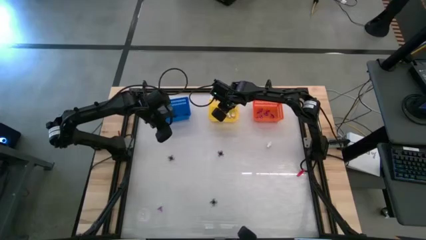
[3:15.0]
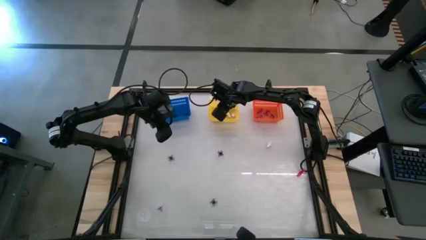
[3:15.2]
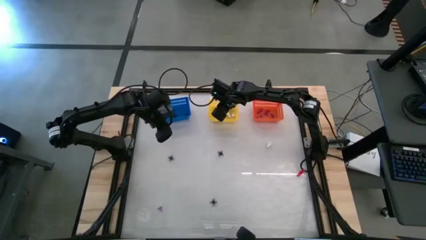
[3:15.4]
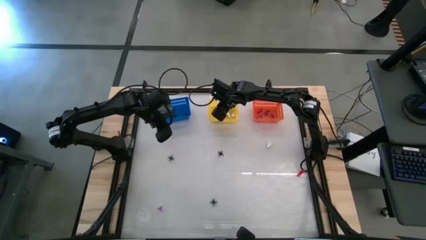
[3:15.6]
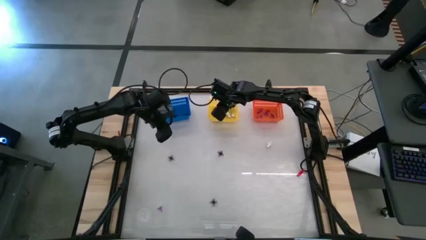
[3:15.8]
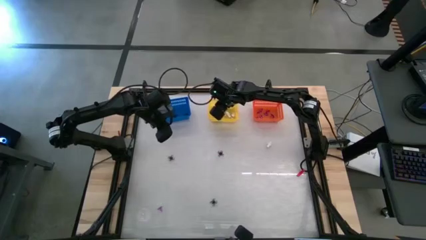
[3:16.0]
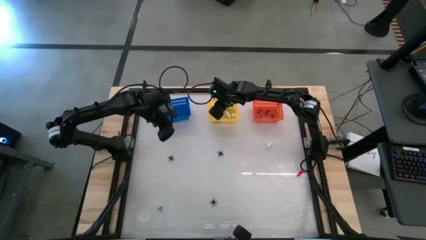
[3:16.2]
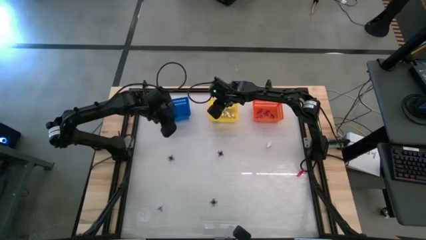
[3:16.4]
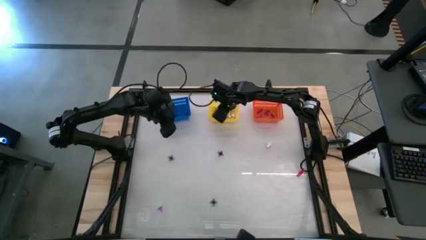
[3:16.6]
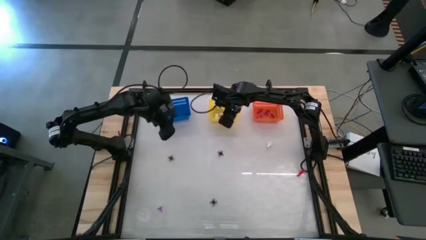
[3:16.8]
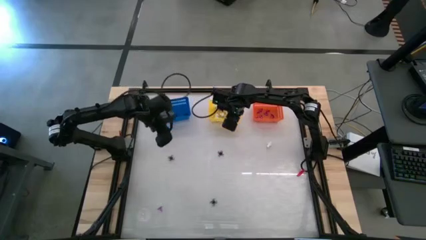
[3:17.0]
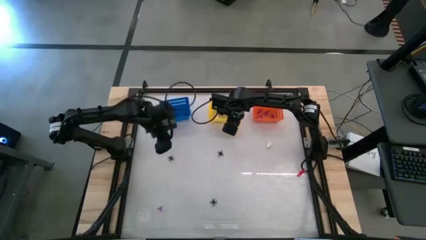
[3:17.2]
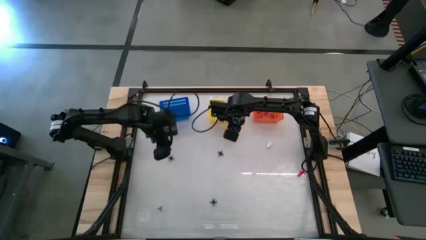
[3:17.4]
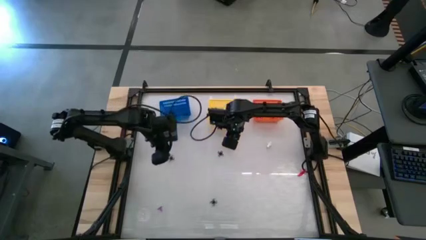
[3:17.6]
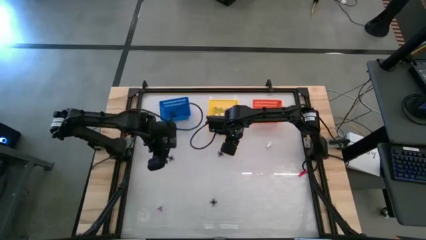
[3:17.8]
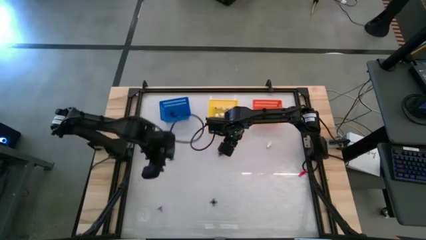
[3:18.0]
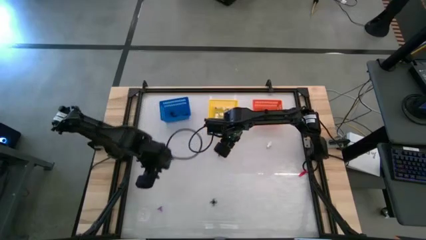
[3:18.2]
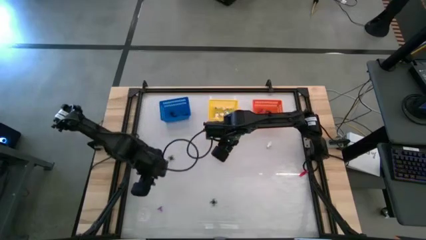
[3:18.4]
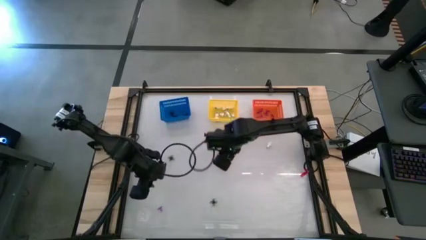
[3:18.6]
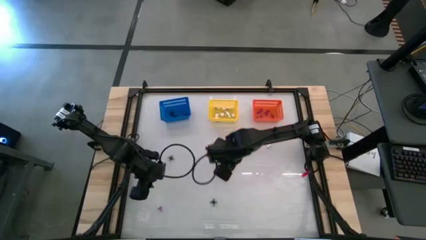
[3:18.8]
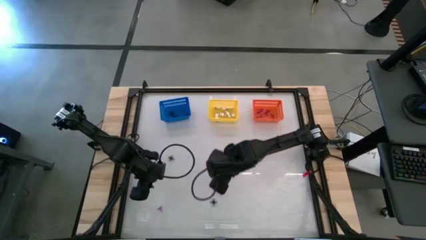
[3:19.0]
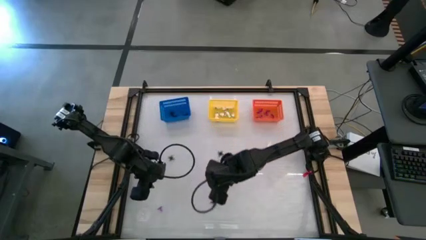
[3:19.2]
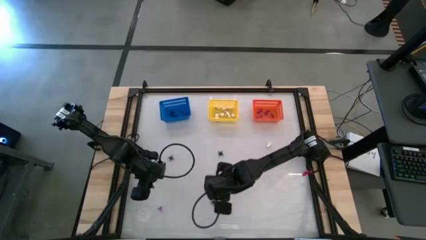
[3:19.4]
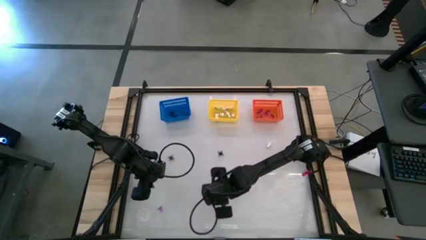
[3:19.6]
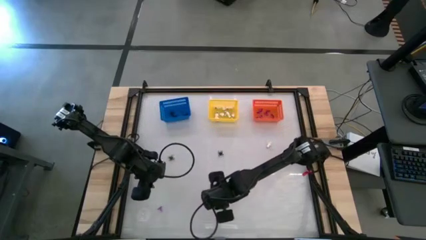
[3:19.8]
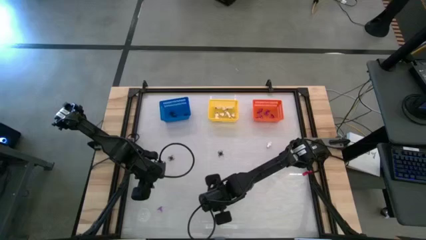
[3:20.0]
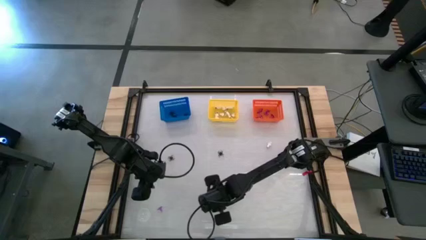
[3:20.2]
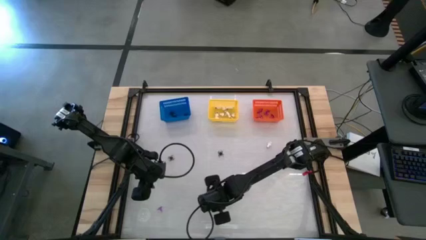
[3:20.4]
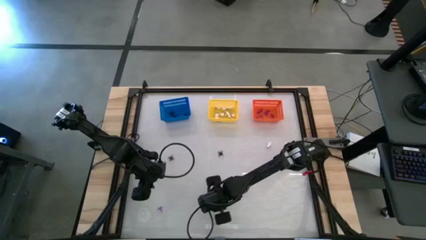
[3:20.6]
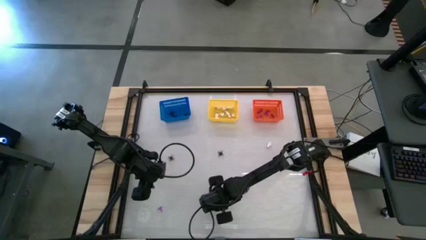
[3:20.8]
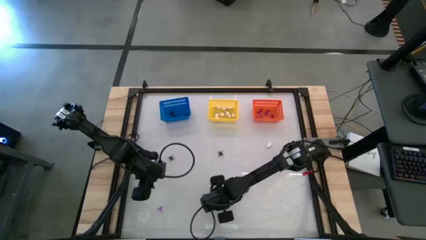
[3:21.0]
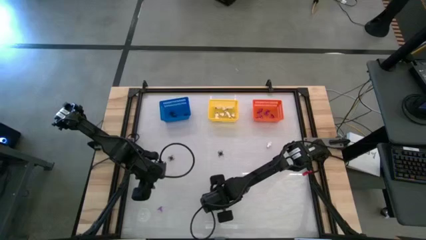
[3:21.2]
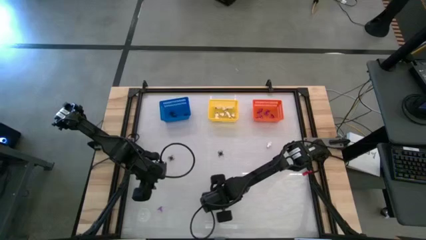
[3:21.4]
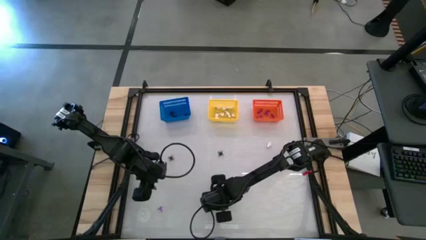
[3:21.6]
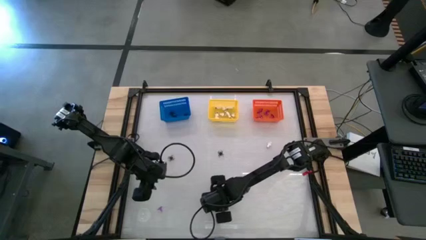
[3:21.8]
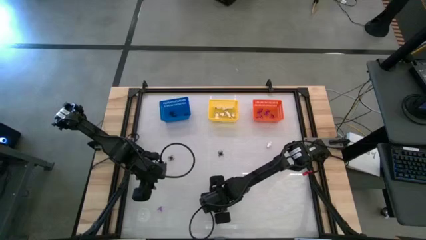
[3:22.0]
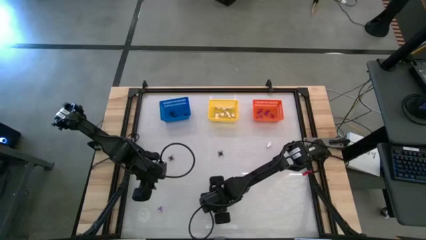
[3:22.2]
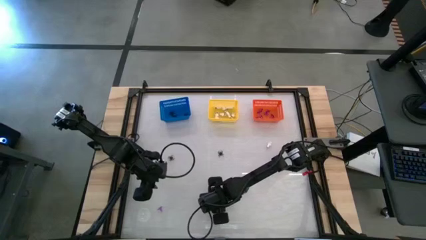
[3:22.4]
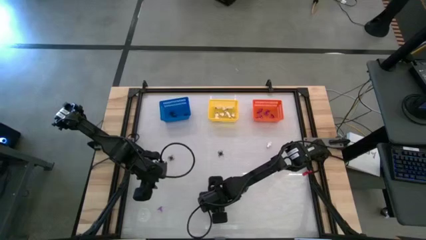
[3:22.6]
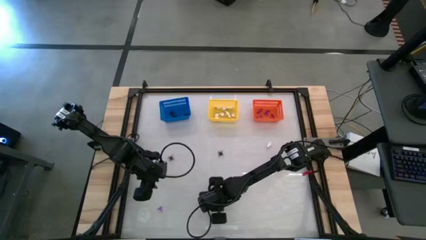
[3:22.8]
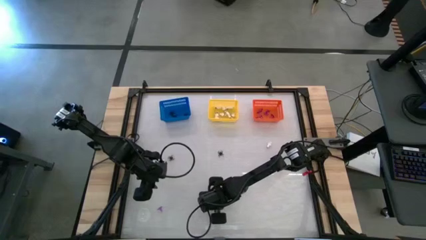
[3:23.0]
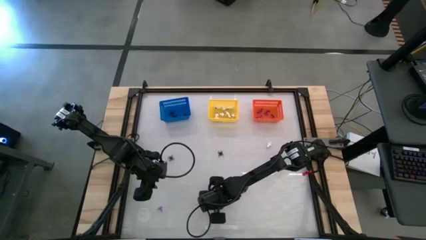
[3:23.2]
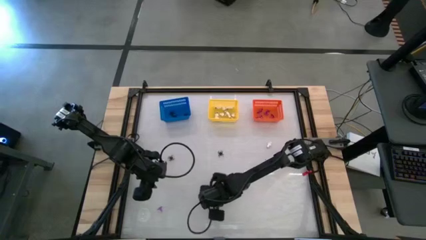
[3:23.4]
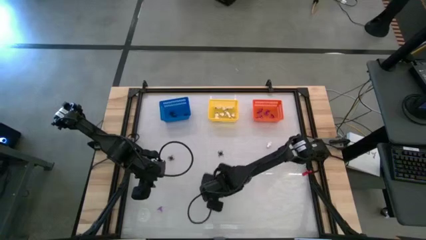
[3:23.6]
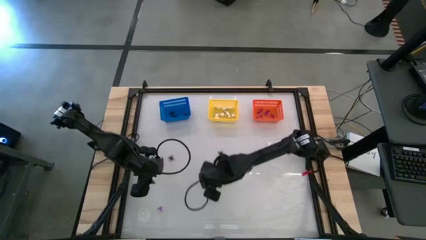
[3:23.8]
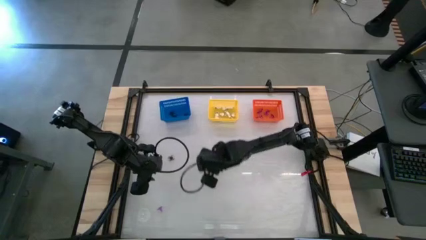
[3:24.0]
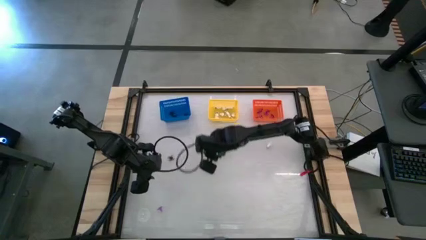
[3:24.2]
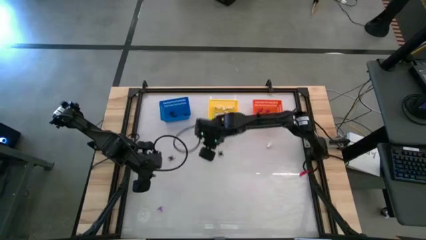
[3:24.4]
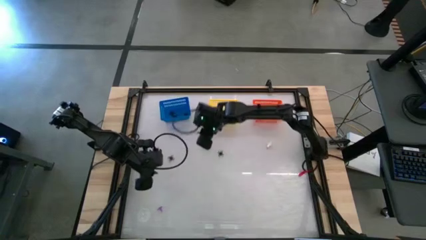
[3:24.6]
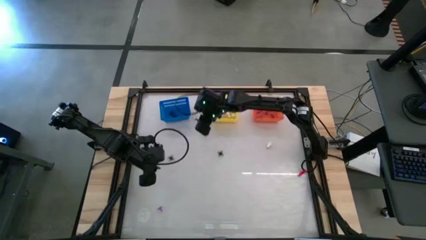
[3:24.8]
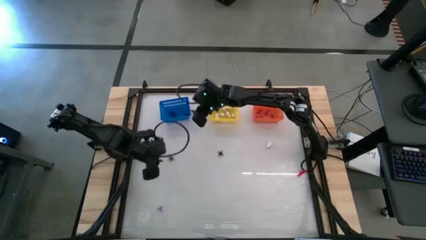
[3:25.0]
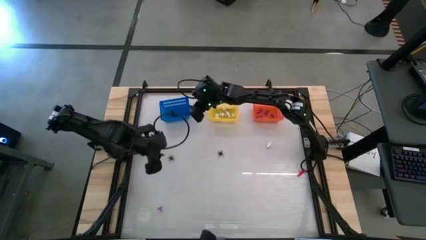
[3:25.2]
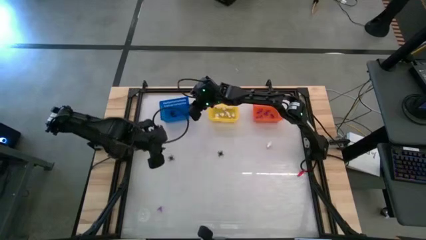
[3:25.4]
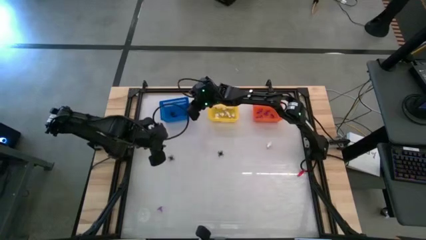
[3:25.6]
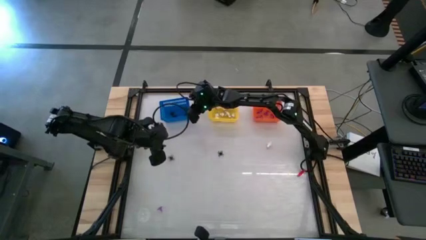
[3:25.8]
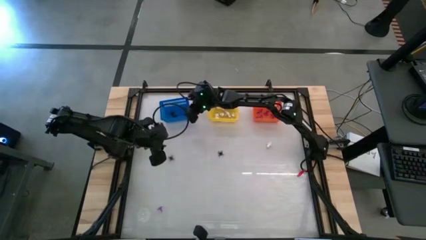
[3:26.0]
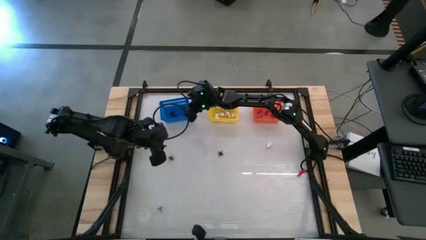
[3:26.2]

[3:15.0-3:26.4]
Task: Sort Halloween decoration
Put the black spider toy into the blue basket

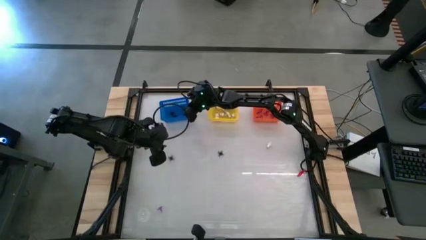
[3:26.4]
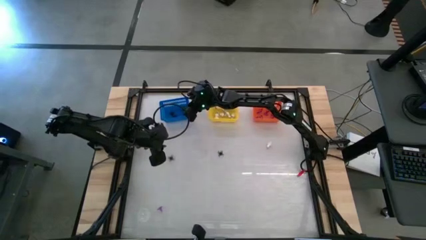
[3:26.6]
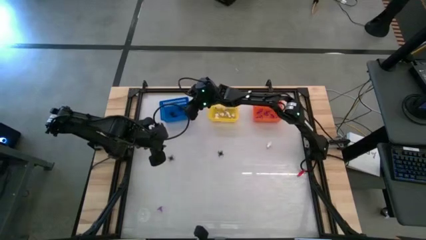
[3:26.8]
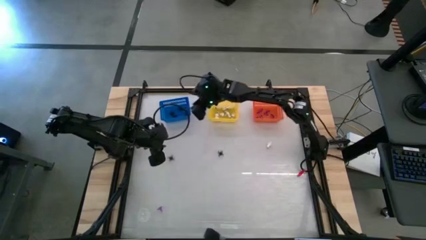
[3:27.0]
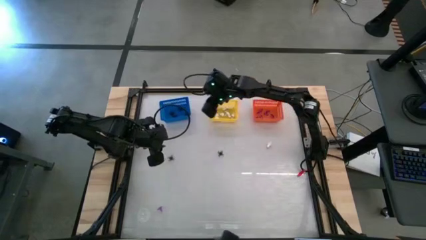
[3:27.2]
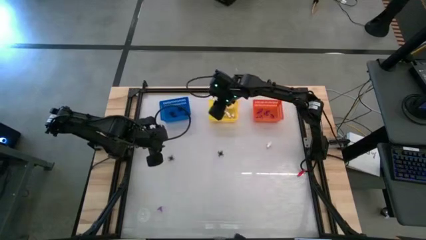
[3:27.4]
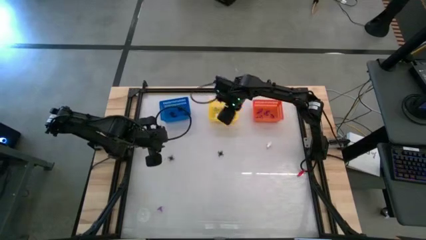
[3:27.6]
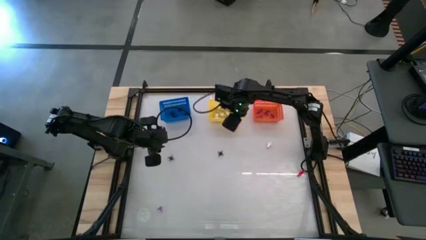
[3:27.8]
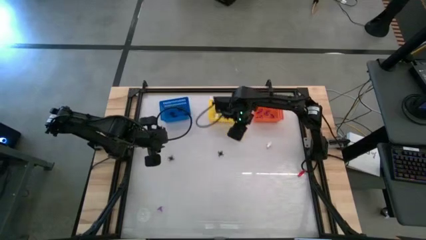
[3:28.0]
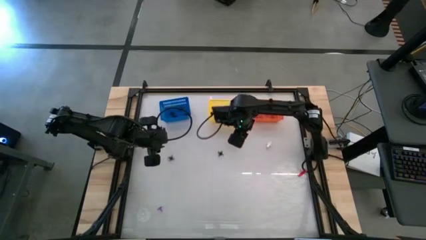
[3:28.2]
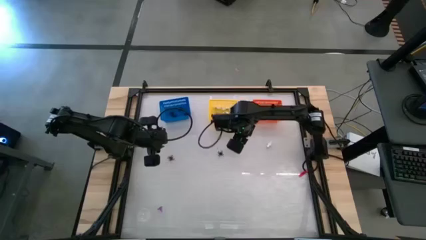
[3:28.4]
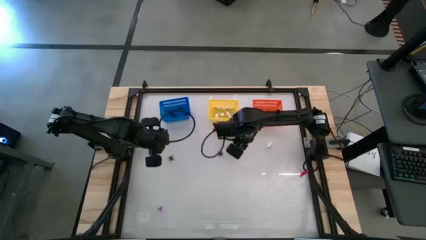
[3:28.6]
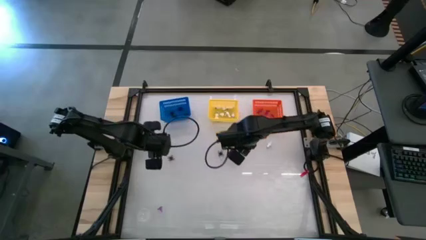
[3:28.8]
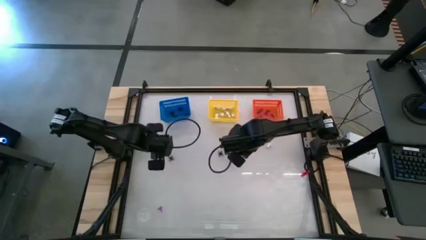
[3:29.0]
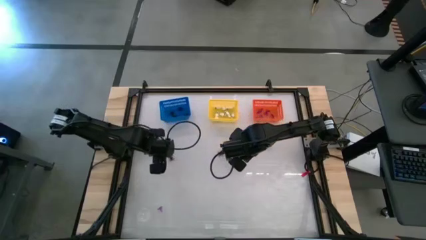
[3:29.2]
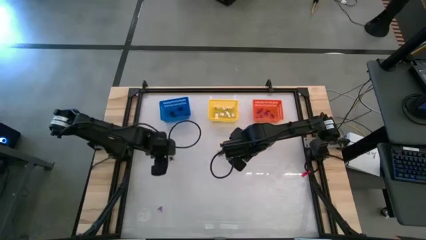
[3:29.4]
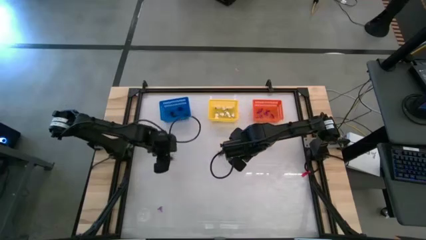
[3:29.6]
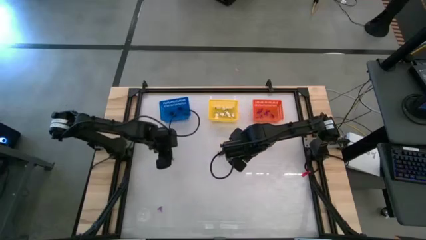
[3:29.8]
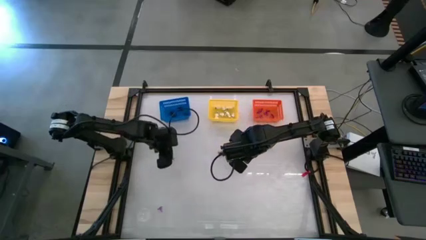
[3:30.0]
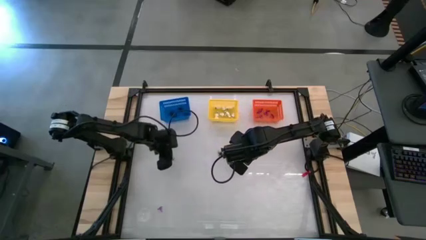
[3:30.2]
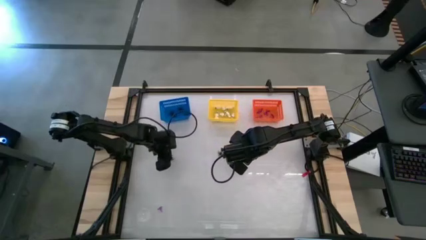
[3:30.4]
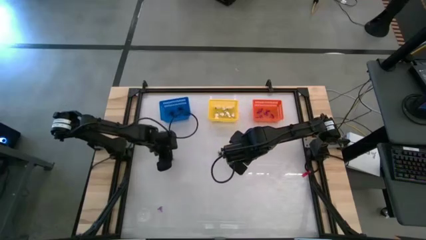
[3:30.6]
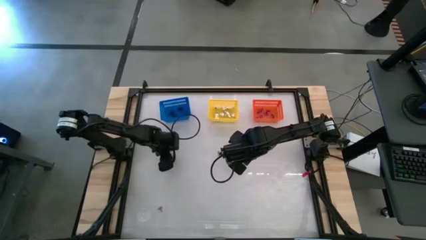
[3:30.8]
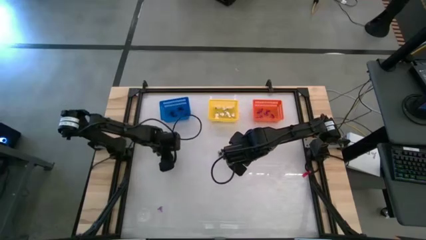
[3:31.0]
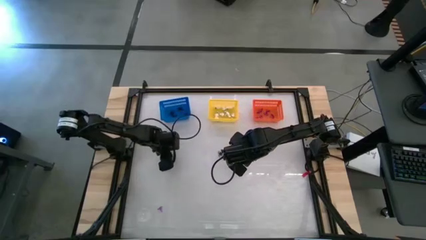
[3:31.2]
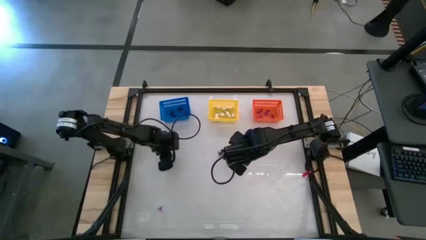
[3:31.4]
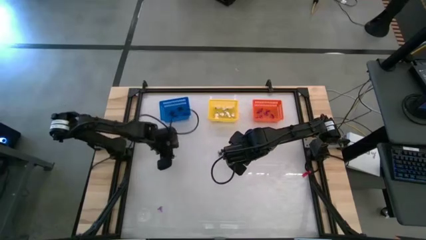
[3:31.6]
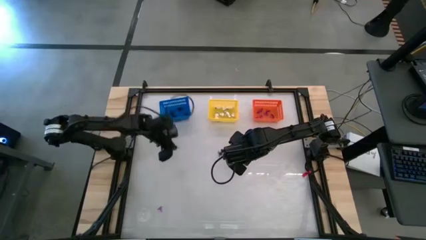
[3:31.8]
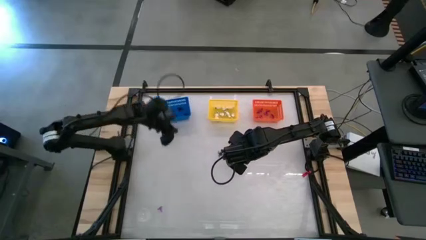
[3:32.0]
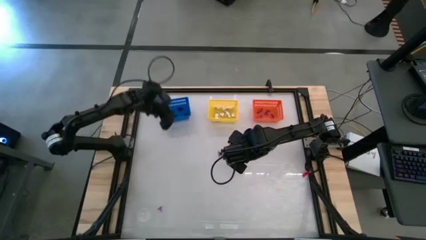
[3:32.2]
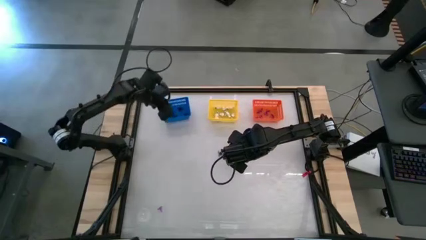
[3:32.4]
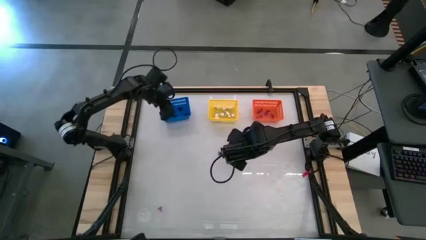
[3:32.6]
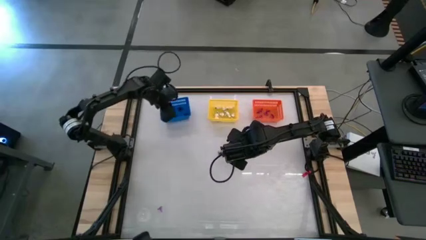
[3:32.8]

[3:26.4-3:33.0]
Put the black spider toy into the blue basket
